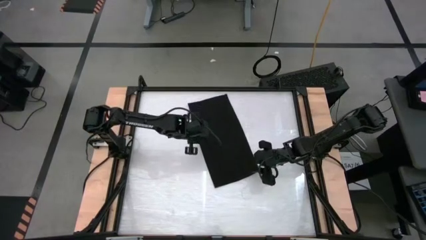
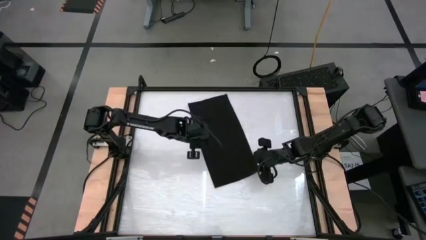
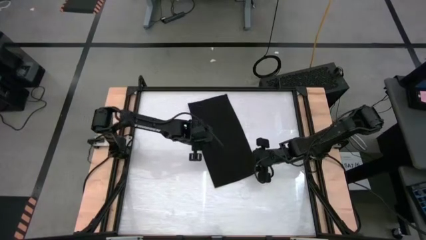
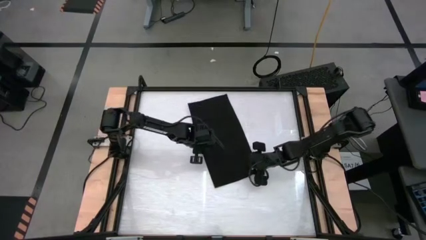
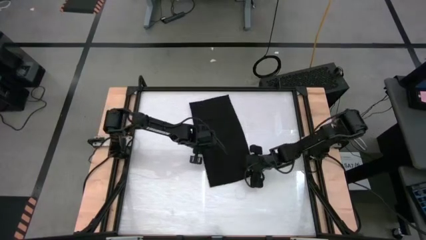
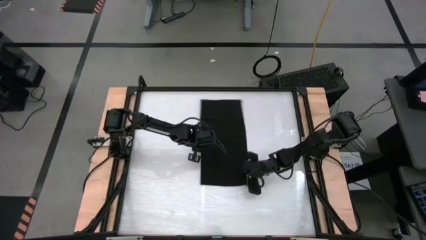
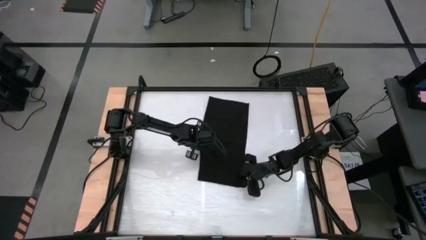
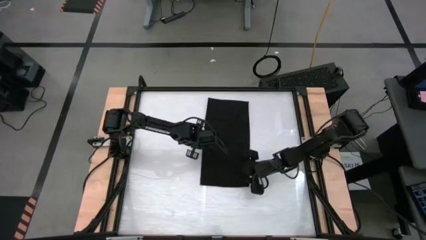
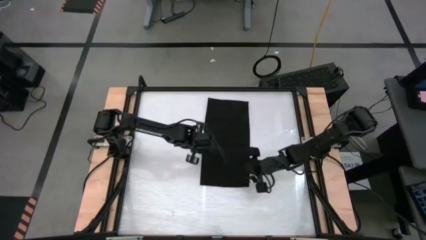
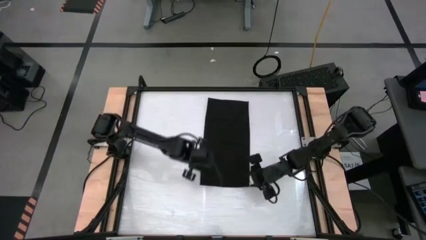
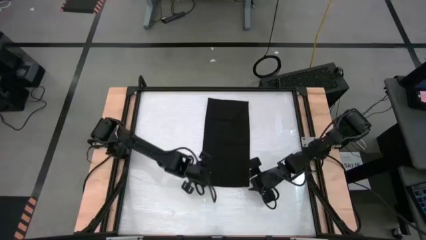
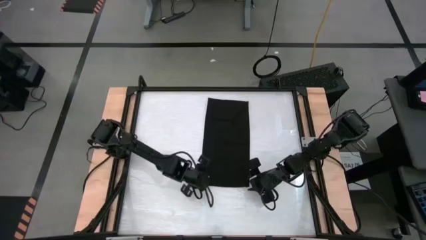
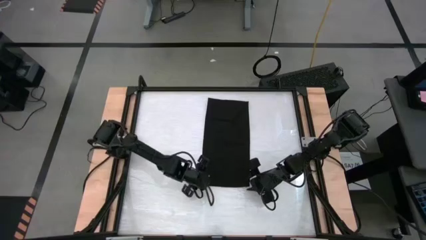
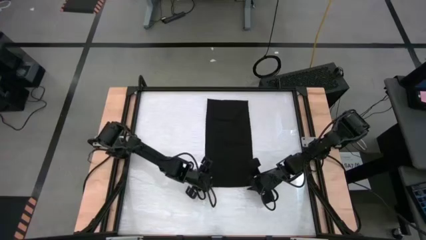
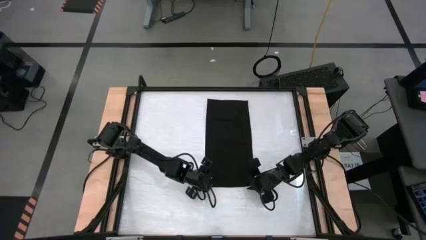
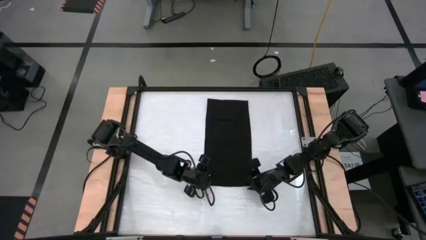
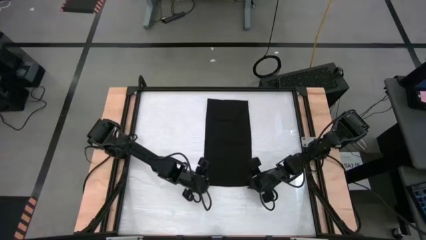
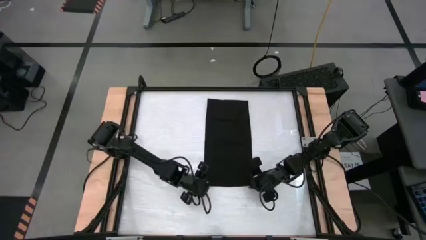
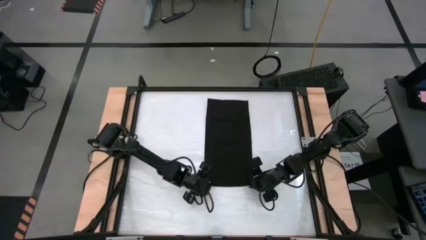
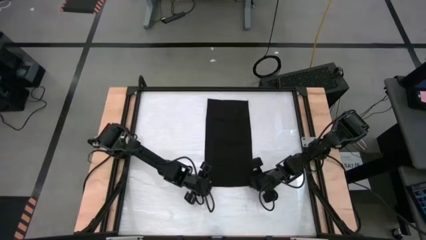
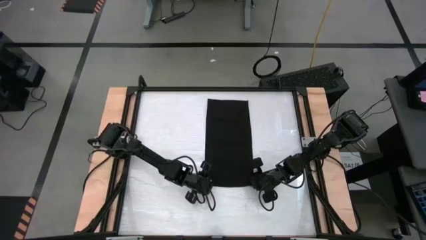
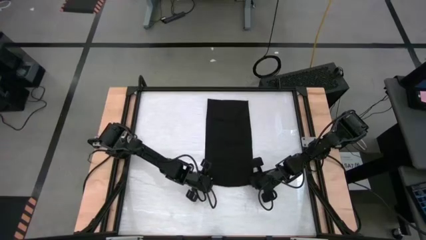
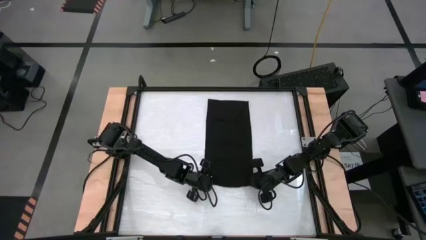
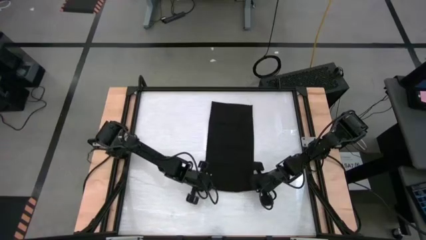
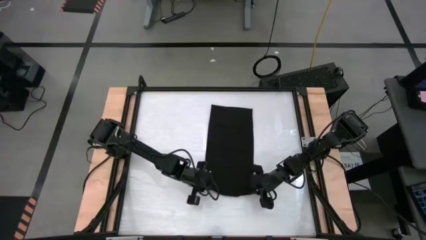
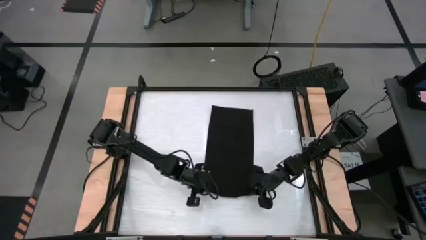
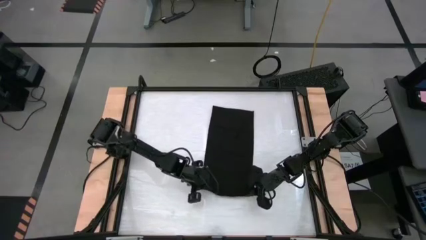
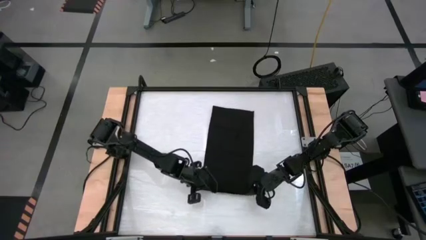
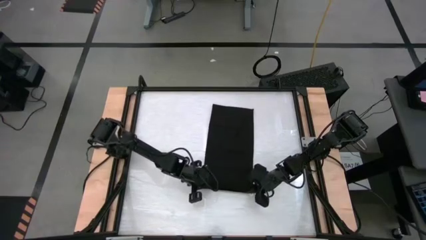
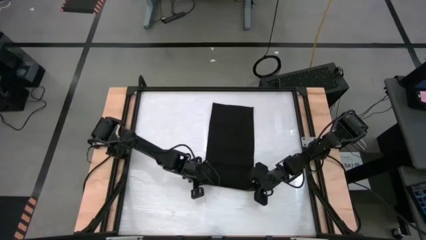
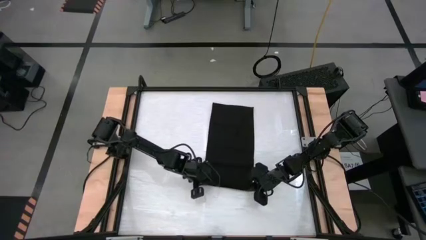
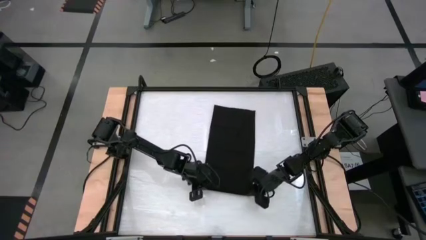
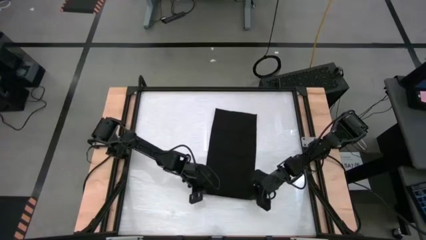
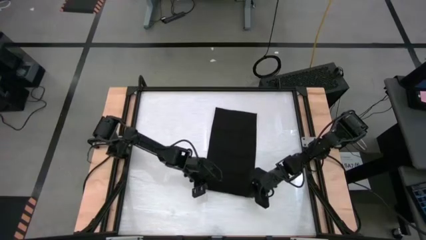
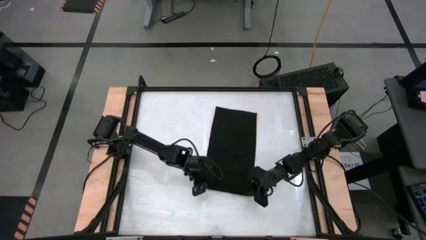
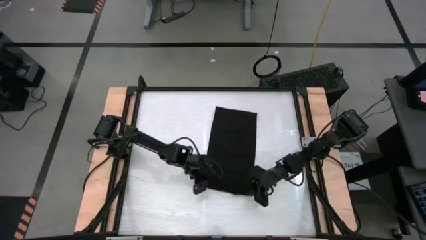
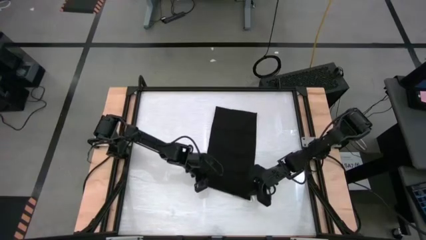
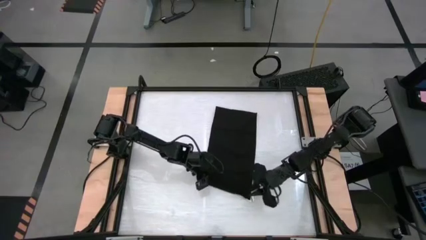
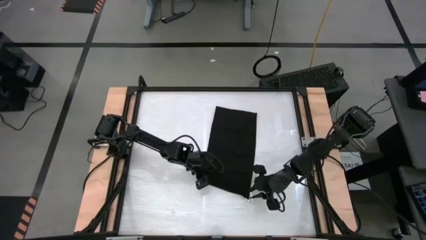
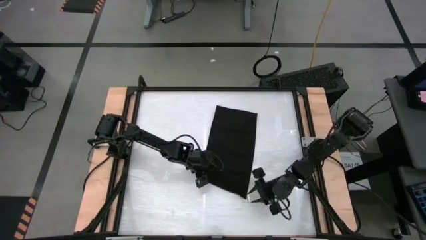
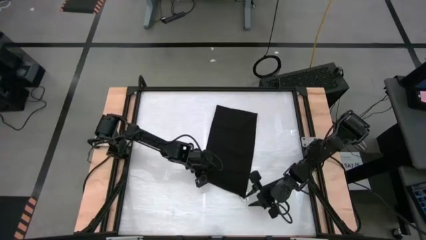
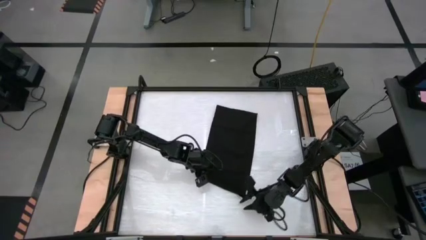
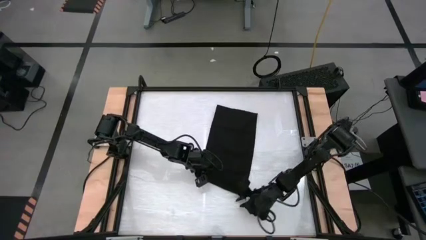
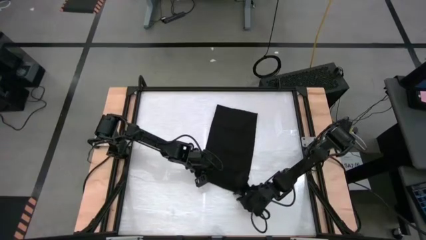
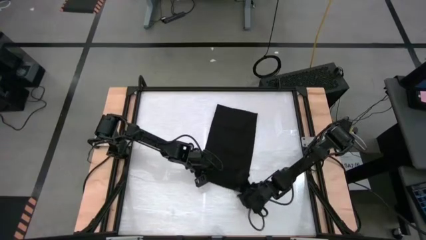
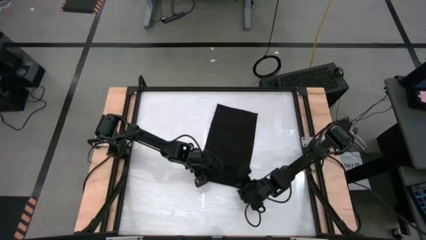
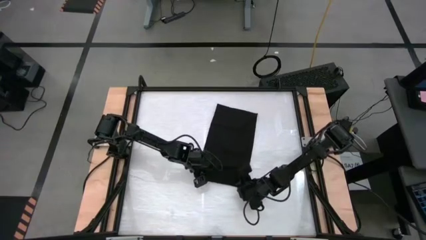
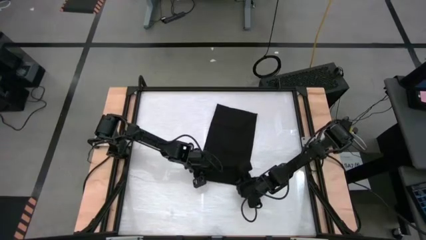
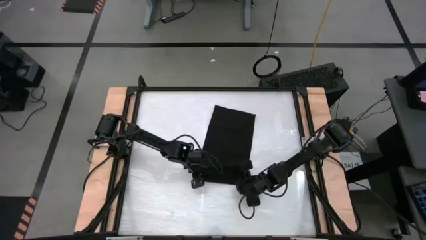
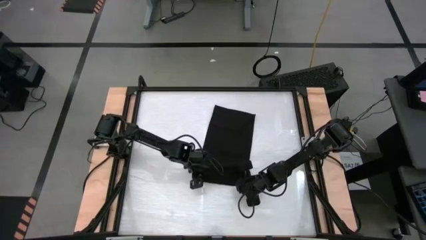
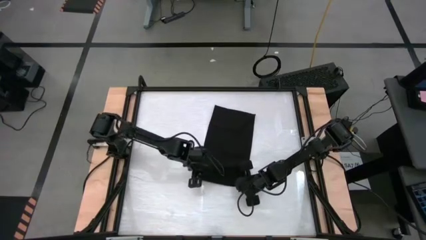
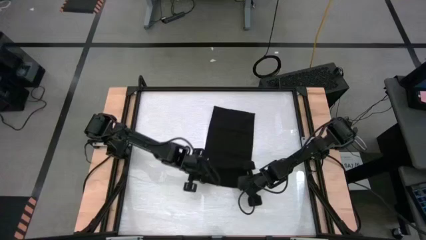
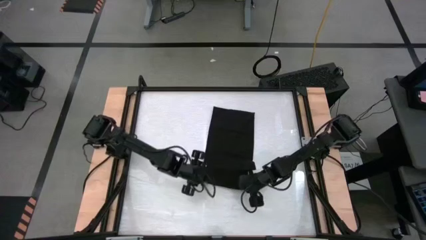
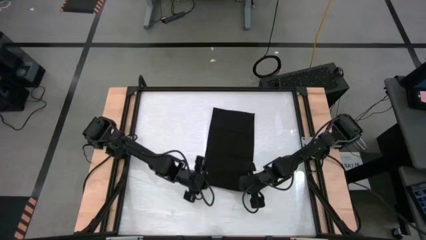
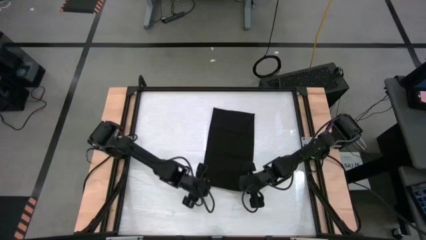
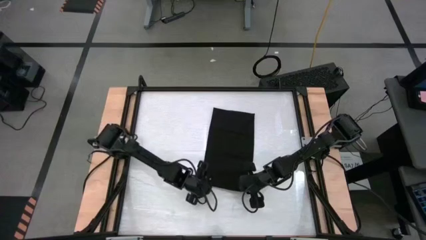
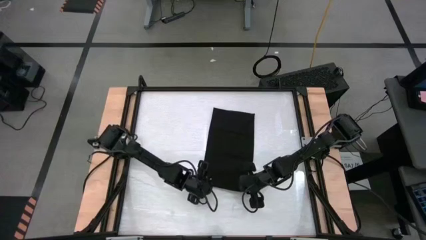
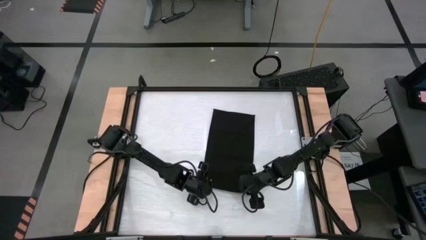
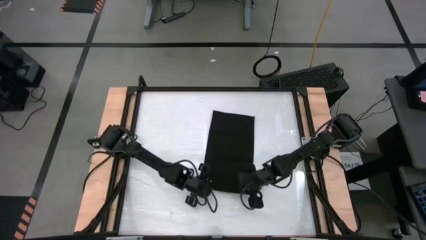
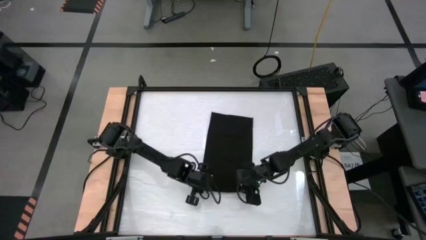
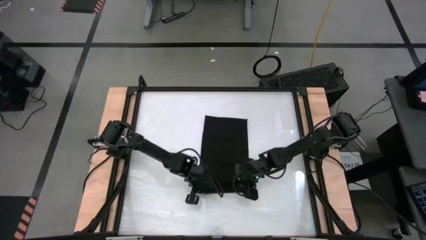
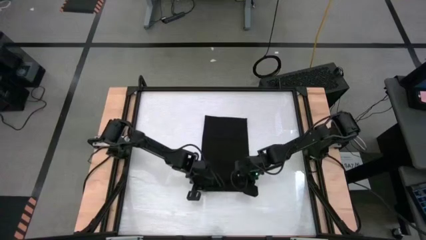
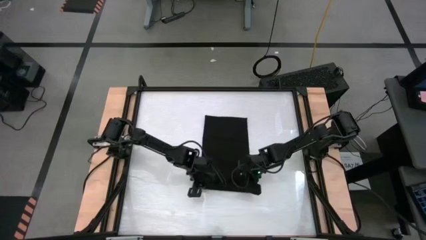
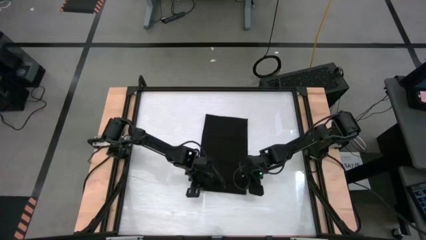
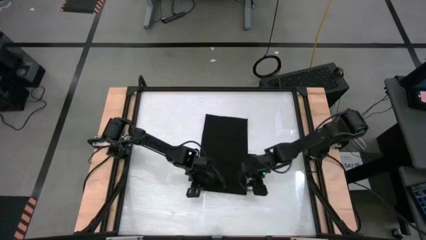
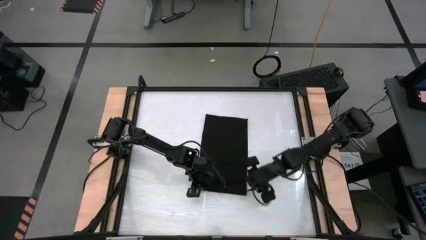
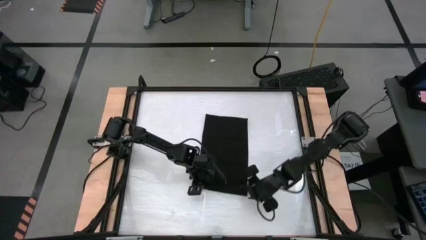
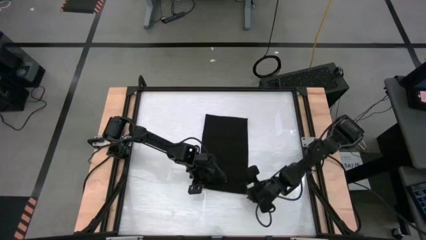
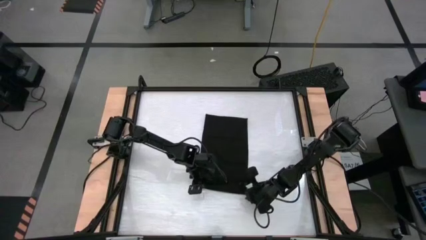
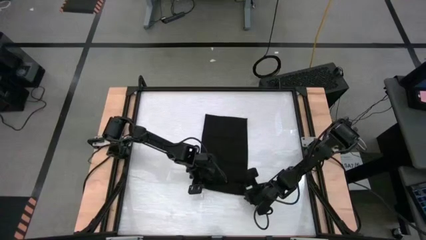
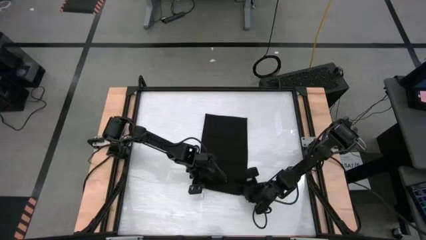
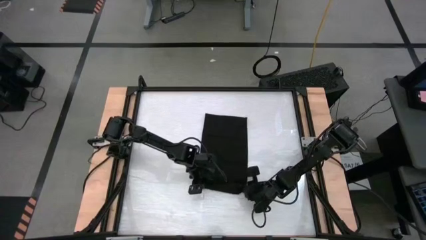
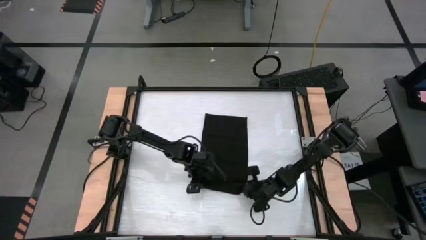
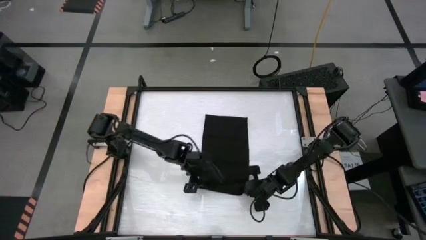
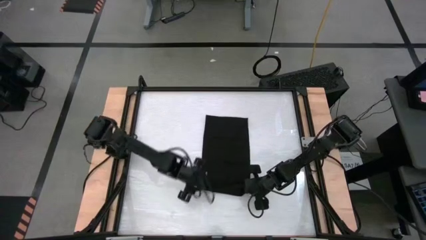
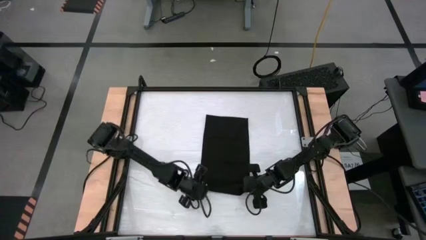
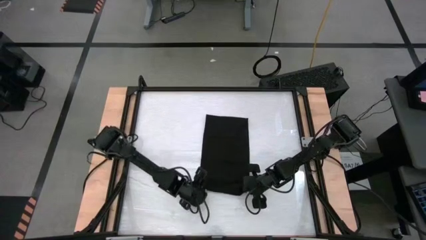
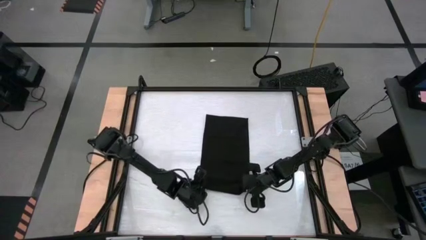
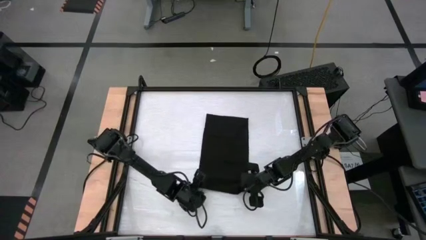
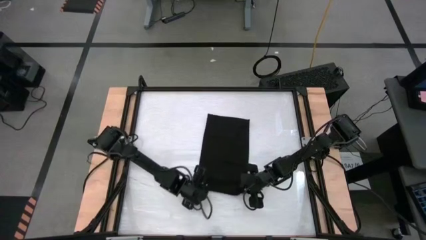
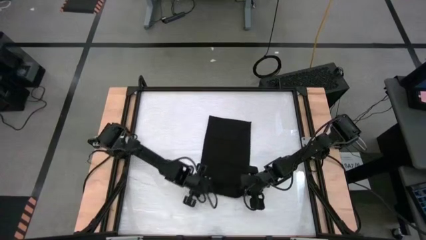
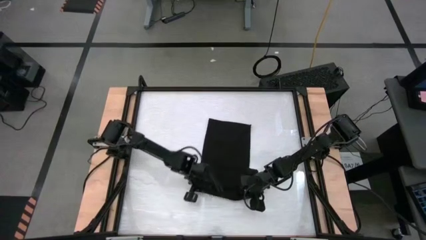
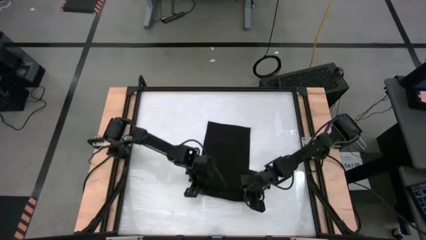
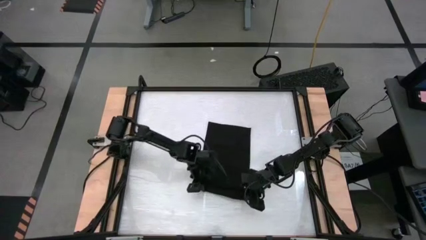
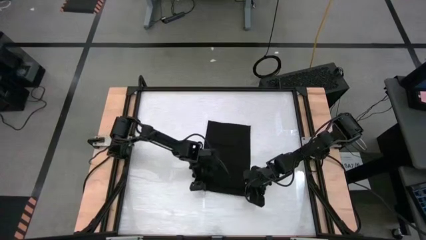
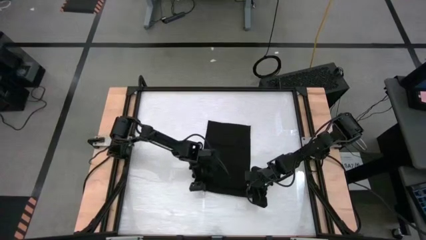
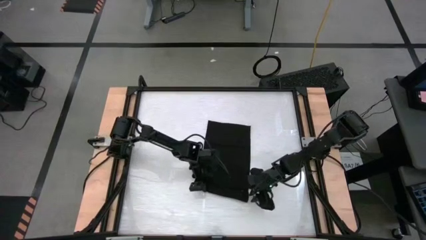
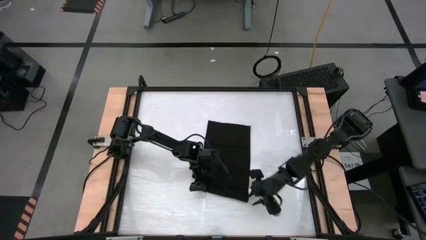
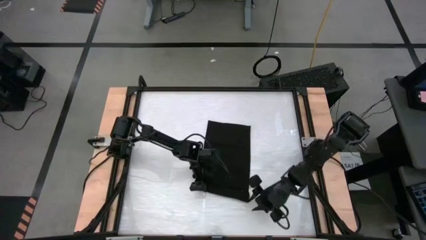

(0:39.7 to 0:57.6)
Task: Roll towel
Roll the black towel
